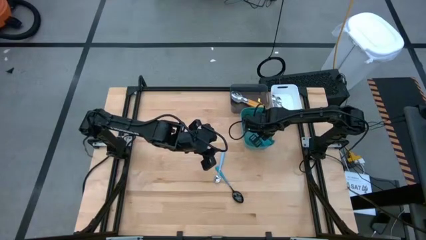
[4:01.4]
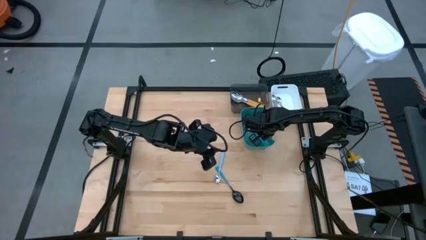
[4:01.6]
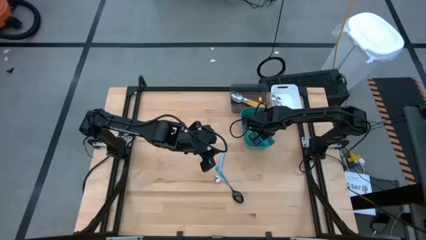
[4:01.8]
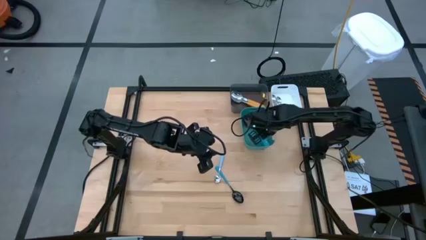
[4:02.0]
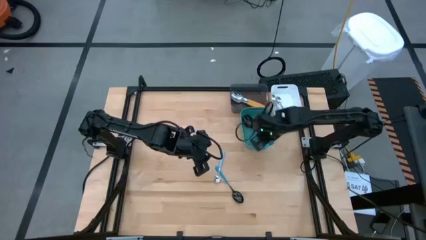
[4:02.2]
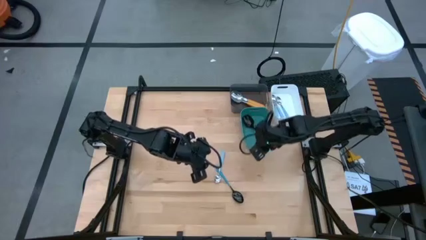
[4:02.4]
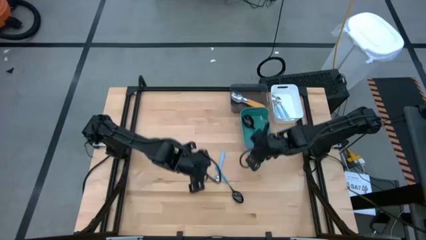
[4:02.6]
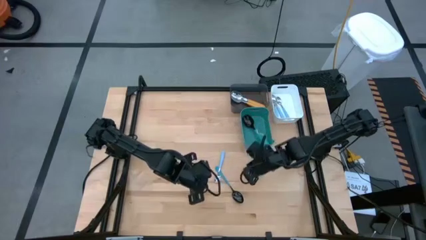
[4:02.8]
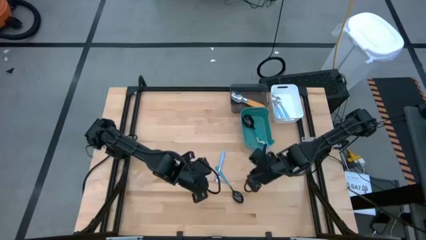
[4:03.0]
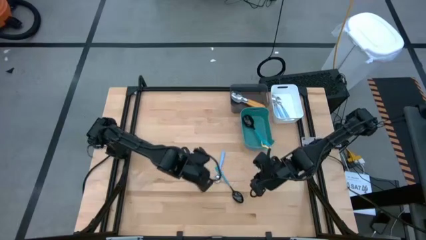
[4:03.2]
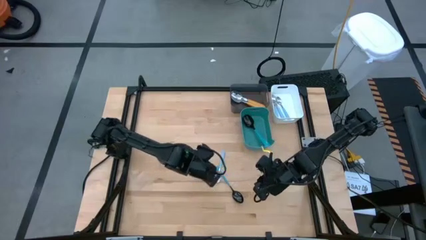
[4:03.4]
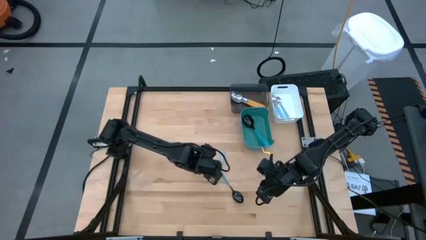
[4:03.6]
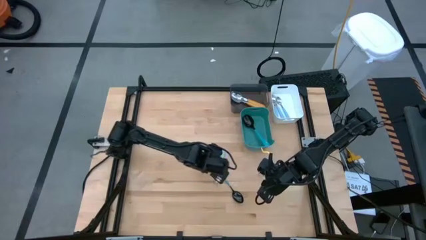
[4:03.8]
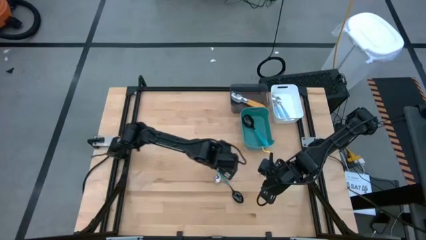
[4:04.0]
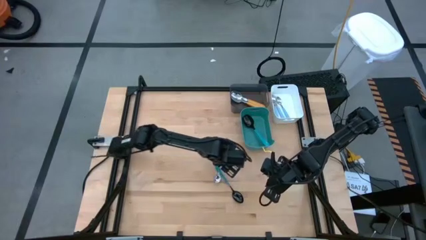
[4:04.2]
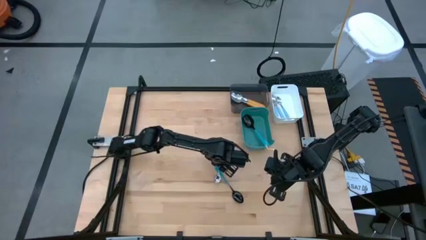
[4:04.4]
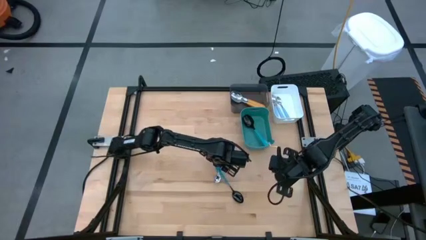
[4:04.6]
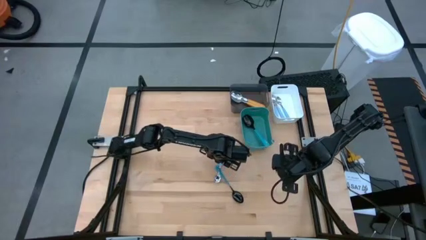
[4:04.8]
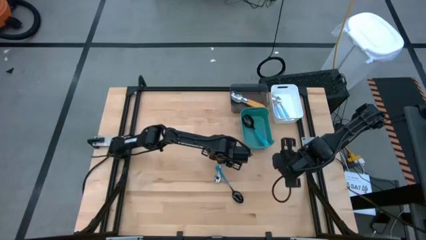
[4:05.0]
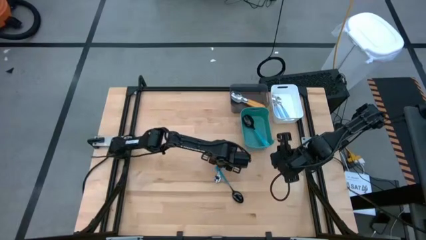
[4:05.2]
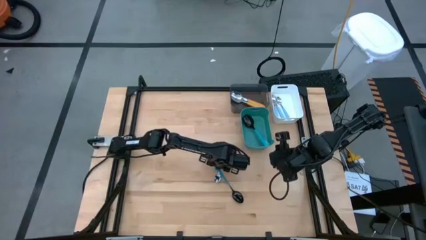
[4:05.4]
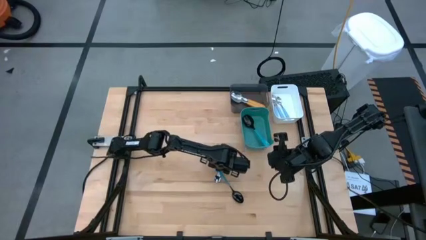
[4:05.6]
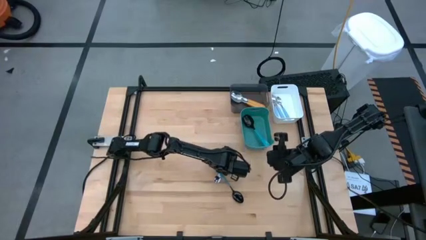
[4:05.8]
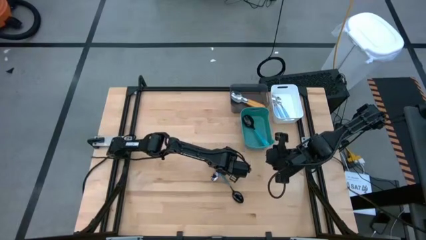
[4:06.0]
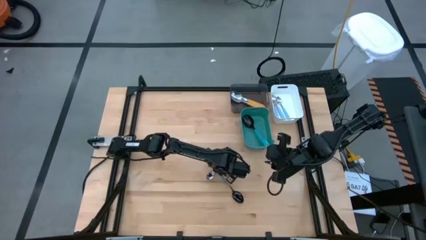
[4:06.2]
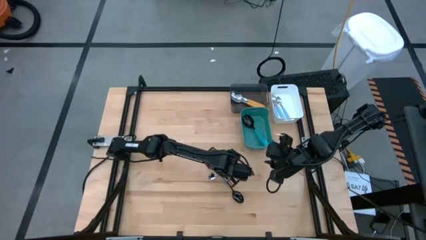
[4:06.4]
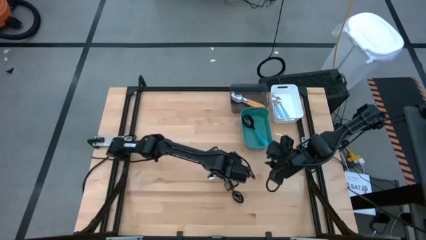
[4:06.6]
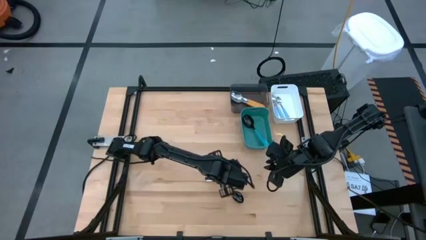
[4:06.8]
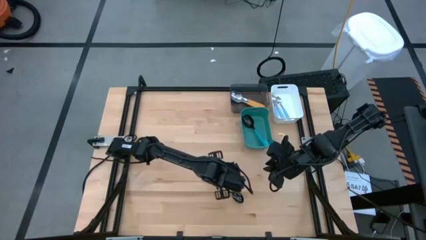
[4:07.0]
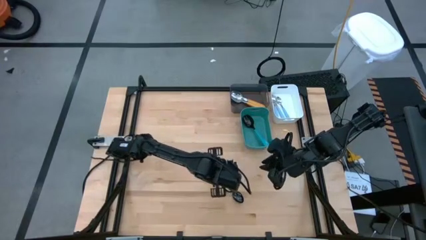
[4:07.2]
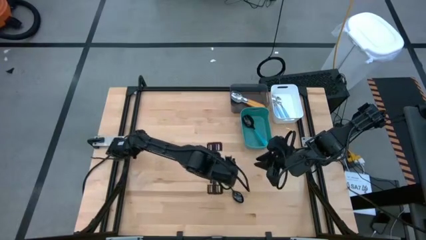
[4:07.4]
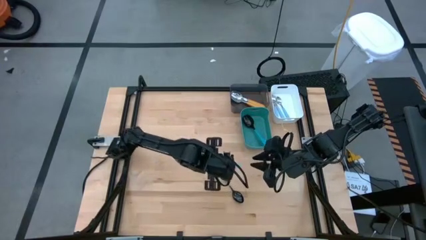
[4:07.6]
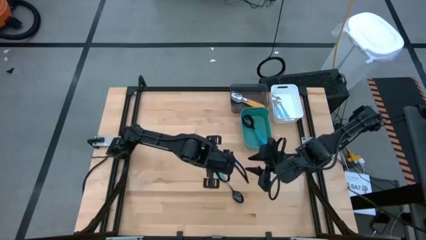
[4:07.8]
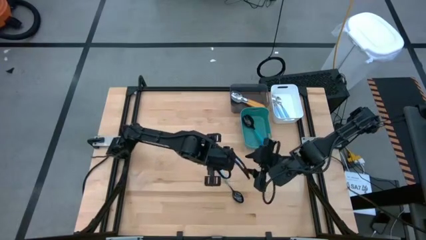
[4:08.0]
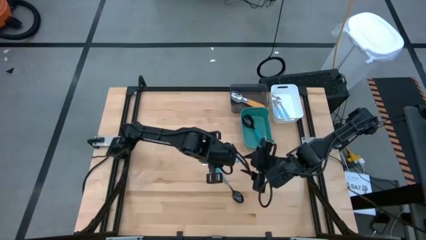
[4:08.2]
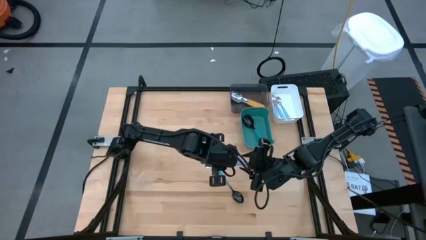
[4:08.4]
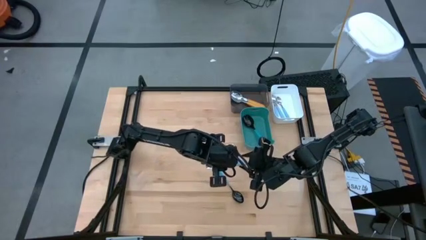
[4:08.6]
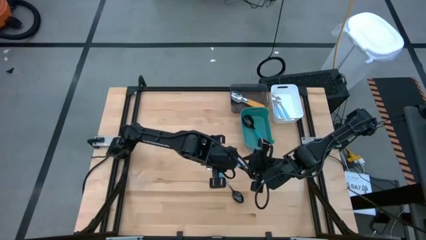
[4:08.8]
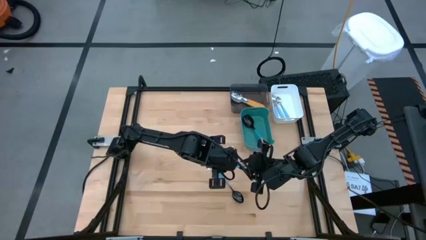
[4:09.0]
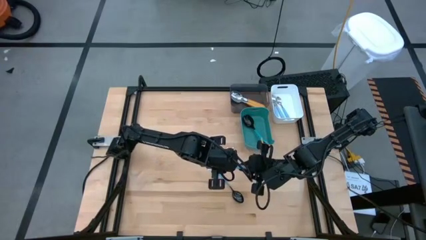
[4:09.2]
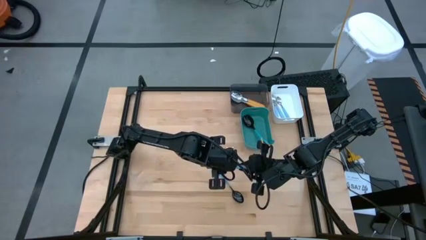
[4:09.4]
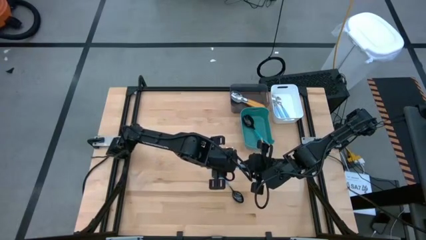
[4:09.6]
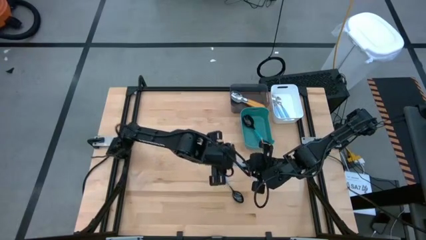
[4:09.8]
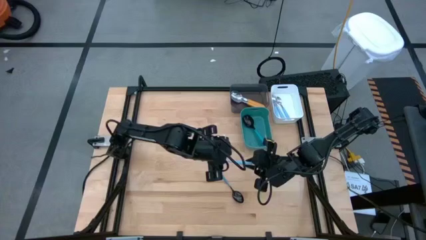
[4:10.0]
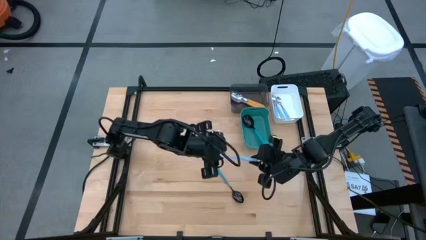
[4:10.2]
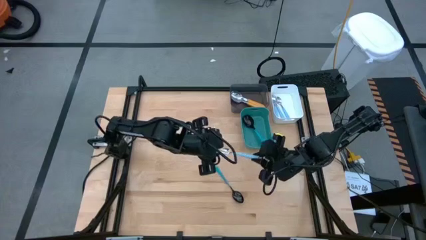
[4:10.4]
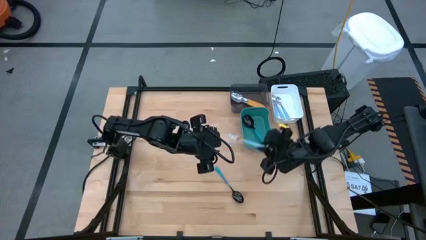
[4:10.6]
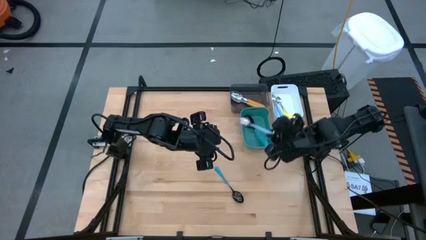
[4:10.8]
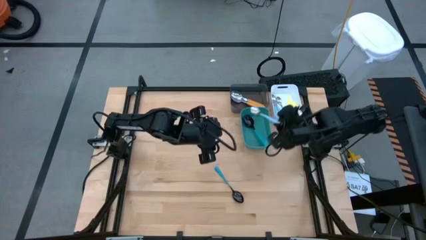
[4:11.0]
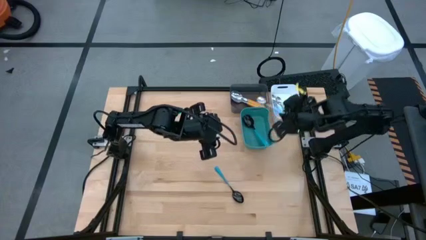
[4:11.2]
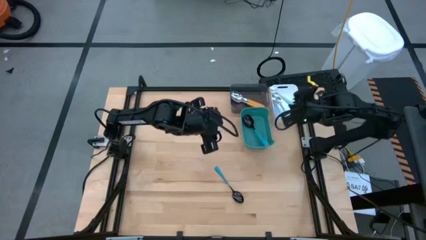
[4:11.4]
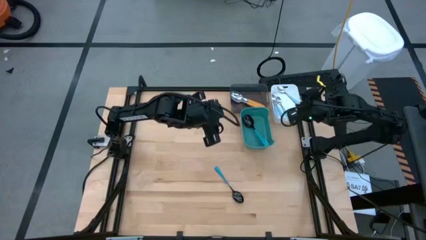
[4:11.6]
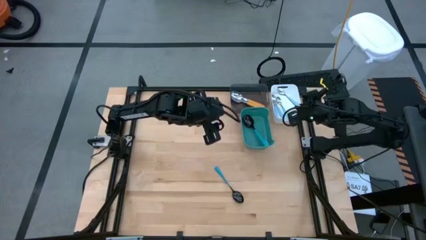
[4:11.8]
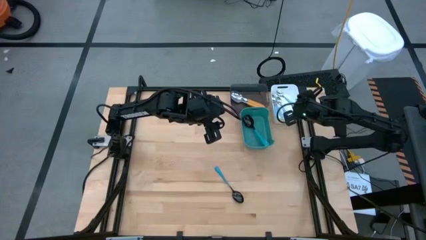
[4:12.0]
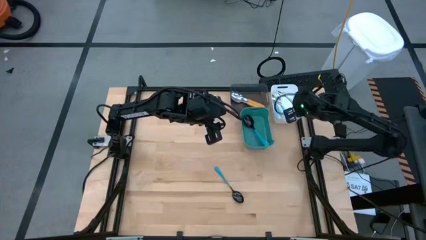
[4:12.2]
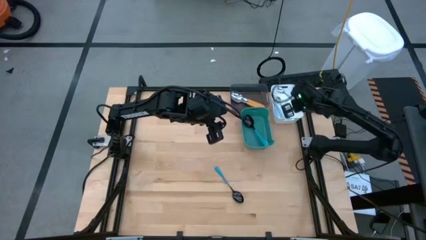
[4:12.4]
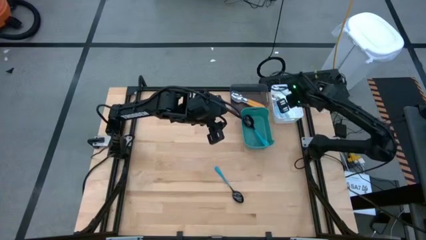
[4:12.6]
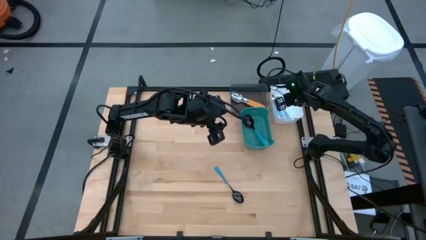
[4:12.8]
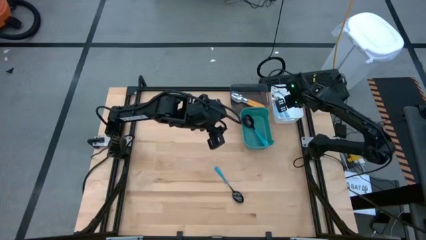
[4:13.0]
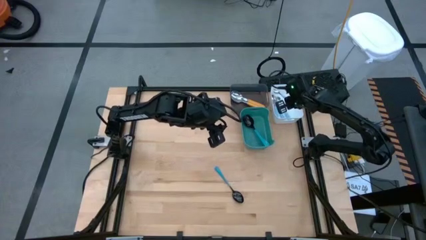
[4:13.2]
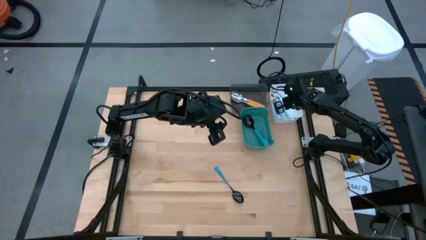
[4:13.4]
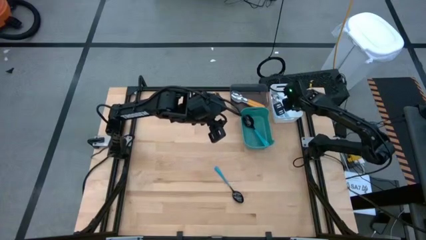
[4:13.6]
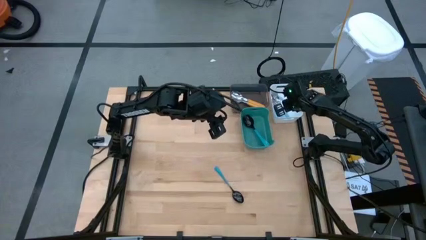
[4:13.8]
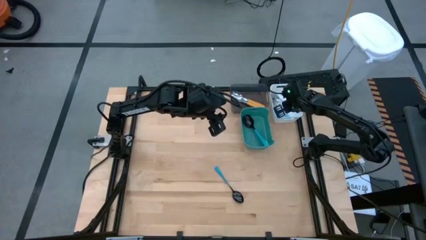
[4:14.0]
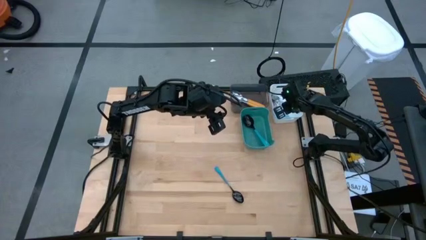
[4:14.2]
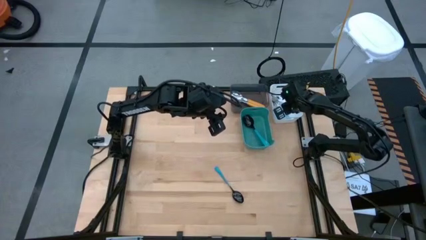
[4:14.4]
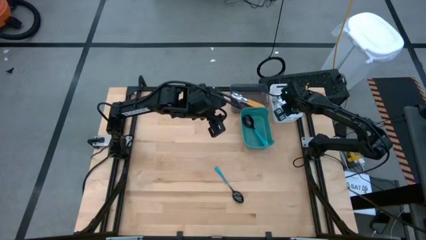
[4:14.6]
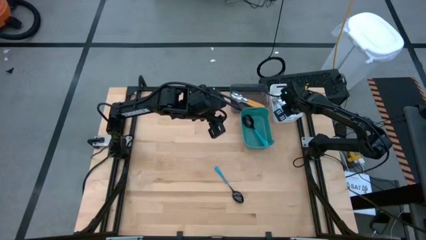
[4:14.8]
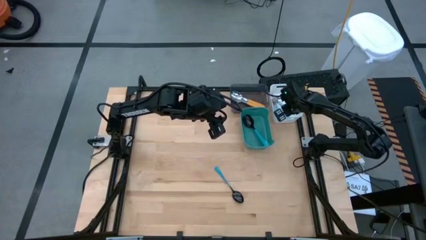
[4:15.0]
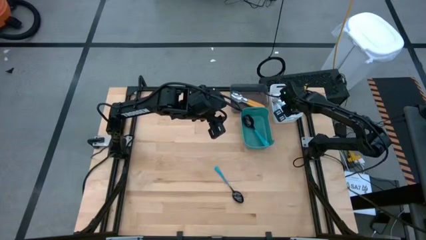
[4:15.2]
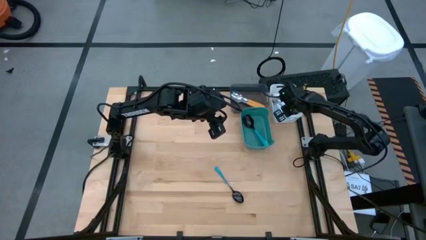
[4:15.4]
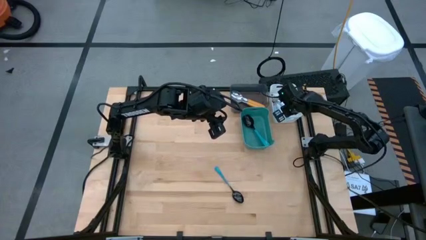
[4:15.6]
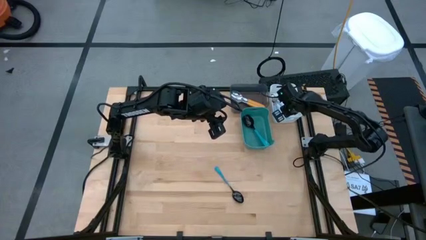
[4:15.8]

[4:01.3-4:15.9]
Task: Sort silverware by color (type)
Put the light blue spoon into the white bin

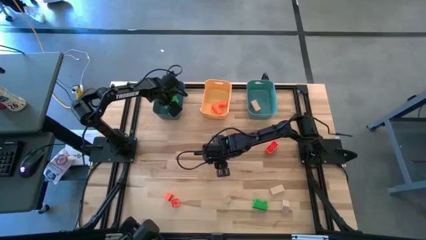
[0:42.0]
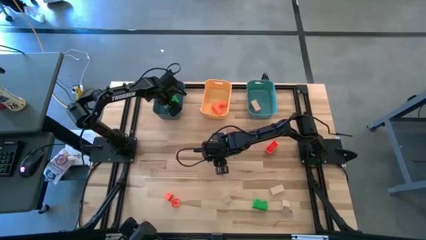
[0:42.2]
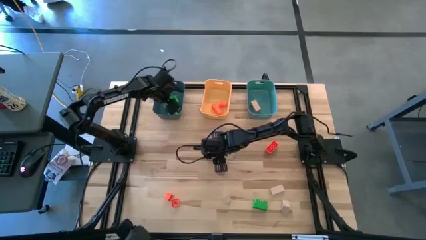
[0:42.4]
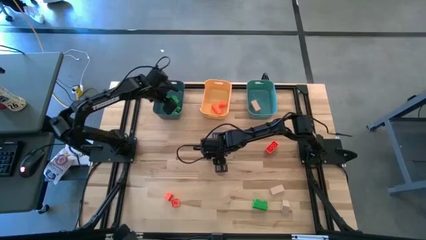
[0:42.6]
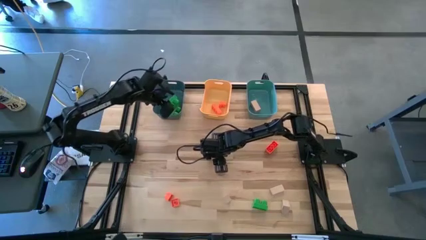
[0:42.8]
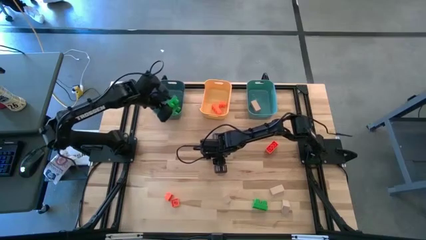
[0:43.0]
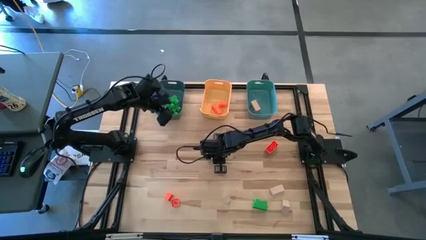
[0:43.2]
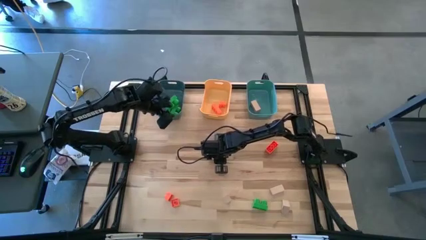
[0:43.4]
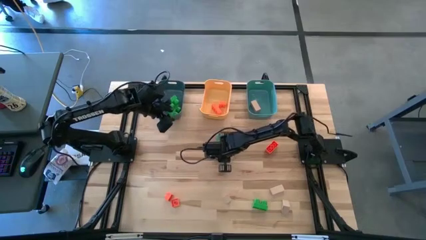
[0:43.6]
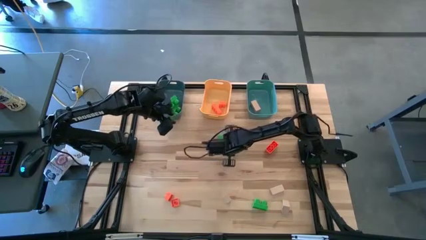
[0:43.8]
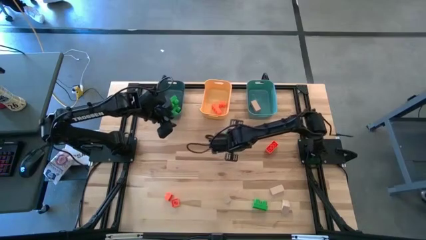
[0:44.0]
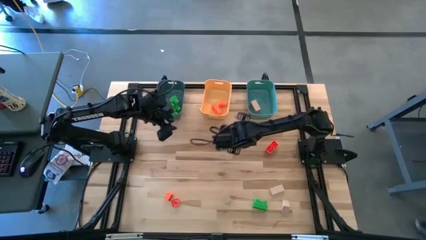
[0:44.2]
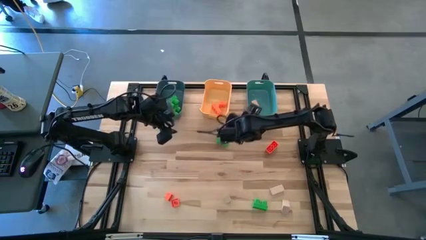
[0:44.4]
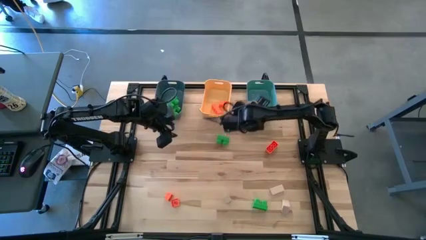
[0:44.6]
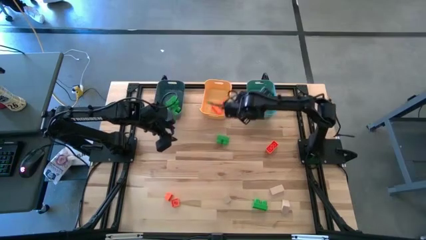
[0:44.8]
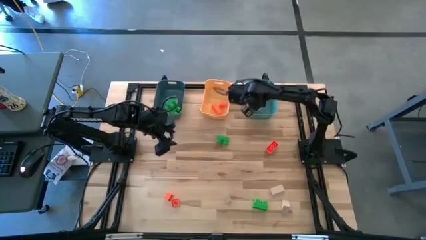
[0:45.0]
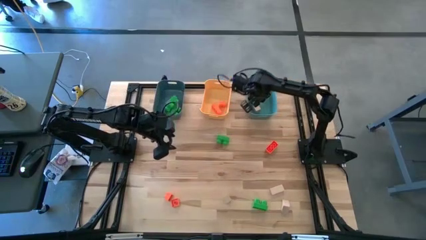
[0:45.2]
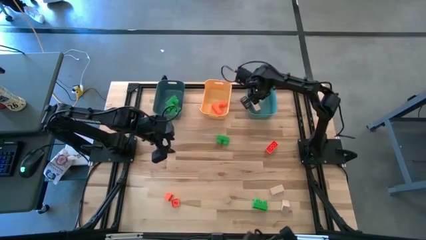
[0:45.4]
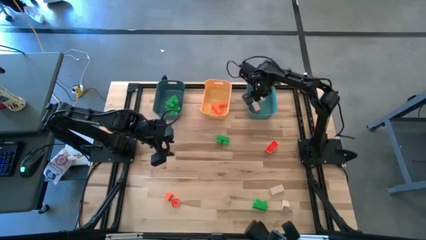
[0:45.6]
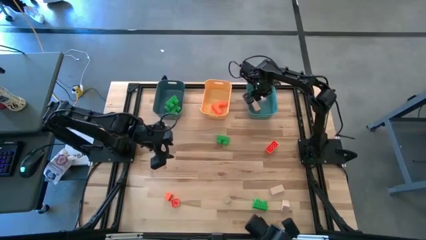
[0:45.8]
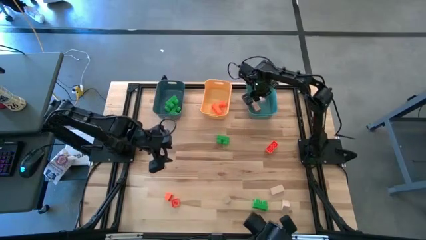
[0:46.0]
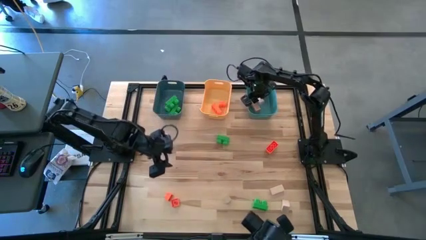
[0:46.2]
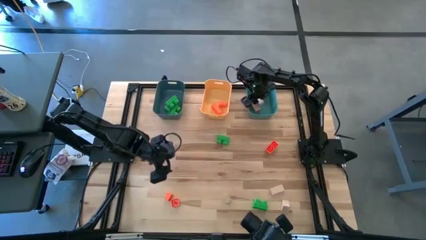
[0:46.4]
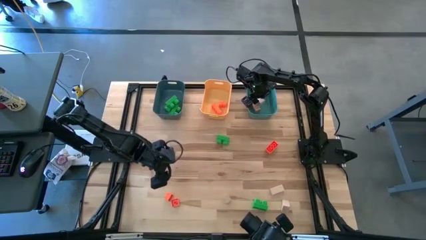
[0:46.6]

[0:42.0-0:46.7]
Task: Sort & place blocks by color
Put the white game piece into the green bin
